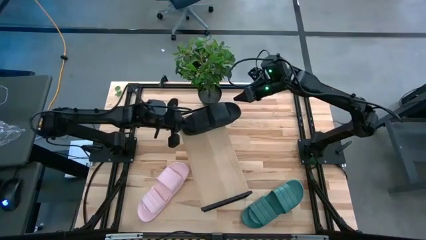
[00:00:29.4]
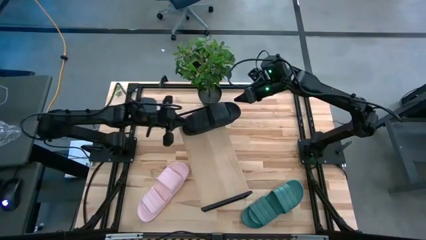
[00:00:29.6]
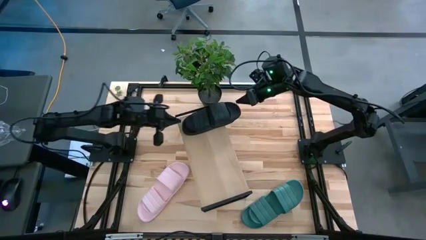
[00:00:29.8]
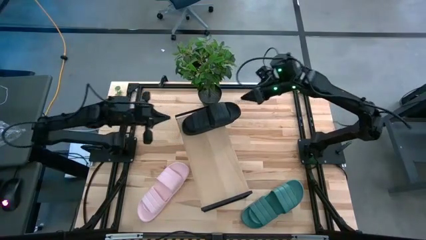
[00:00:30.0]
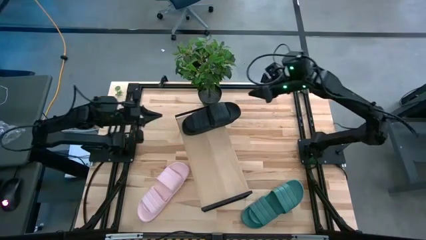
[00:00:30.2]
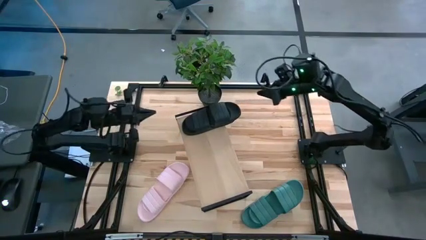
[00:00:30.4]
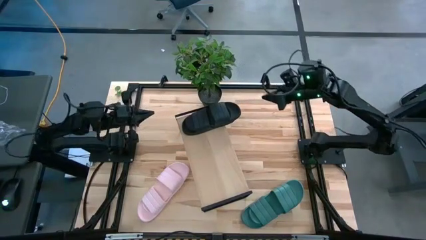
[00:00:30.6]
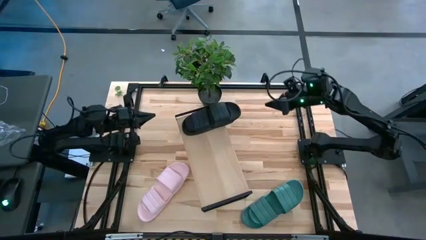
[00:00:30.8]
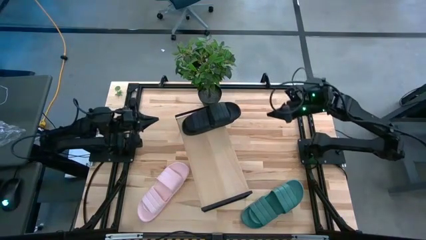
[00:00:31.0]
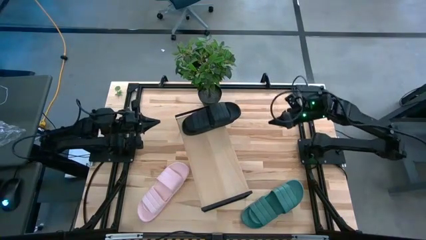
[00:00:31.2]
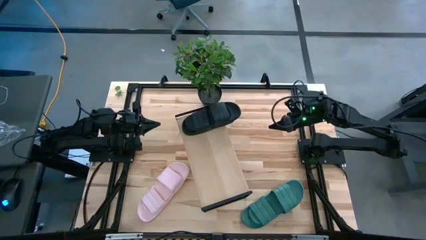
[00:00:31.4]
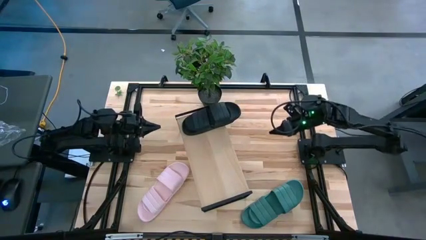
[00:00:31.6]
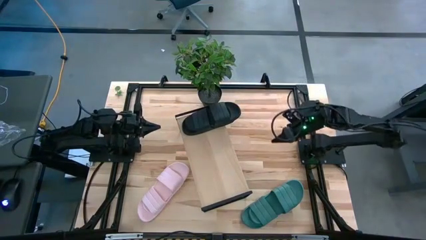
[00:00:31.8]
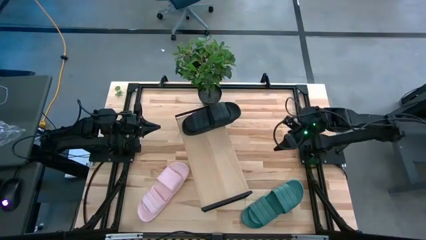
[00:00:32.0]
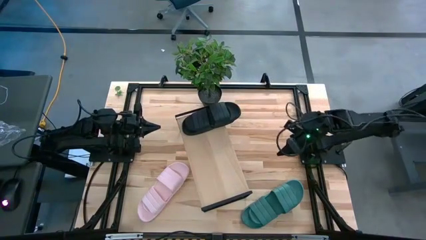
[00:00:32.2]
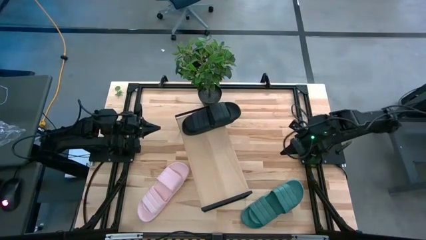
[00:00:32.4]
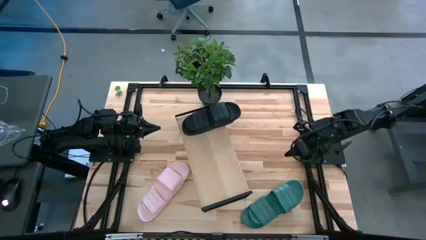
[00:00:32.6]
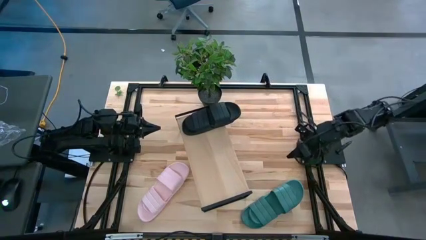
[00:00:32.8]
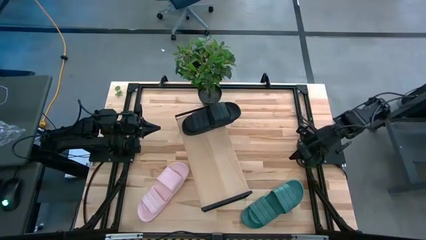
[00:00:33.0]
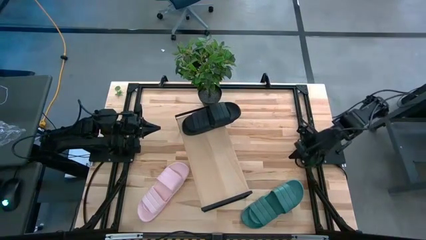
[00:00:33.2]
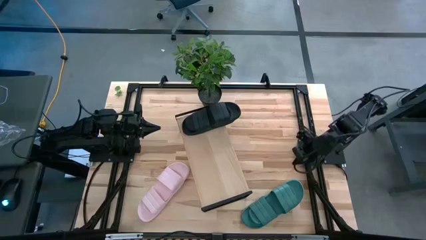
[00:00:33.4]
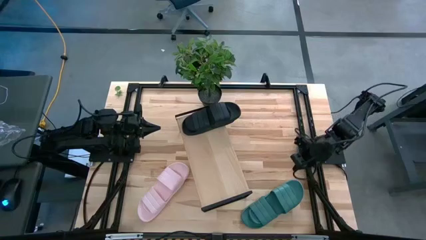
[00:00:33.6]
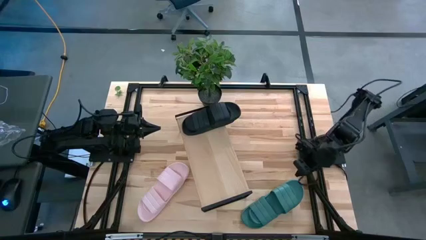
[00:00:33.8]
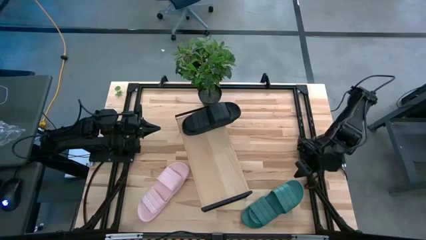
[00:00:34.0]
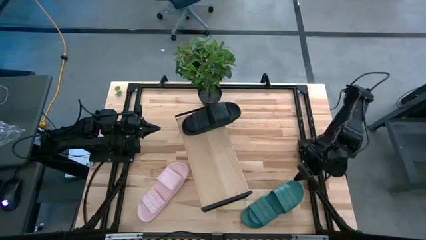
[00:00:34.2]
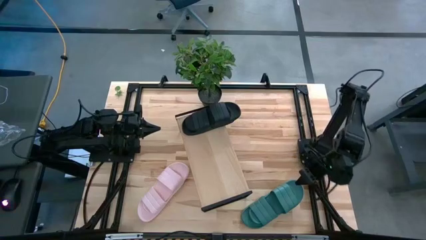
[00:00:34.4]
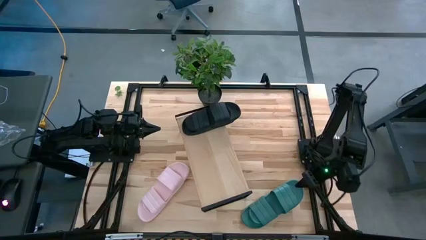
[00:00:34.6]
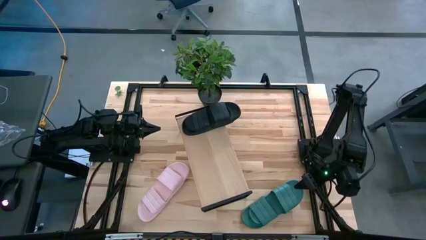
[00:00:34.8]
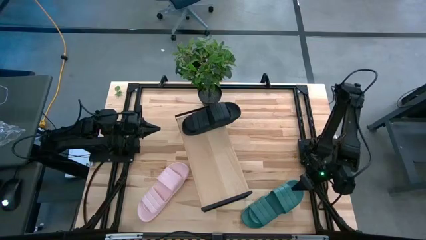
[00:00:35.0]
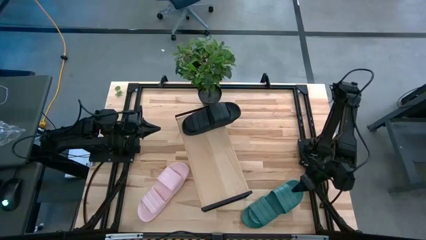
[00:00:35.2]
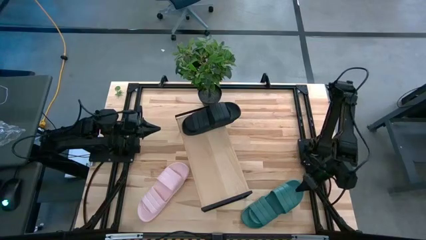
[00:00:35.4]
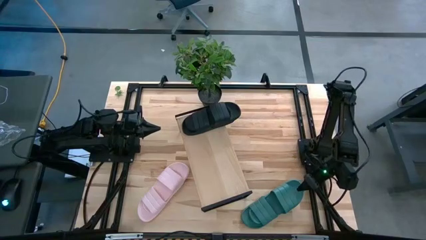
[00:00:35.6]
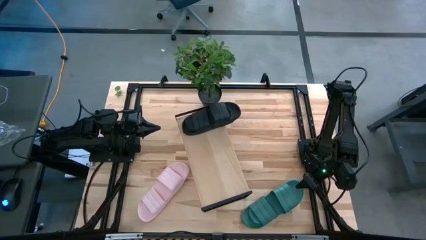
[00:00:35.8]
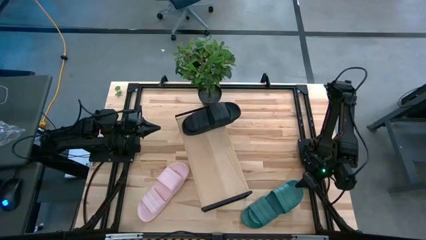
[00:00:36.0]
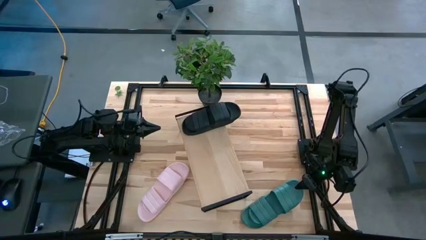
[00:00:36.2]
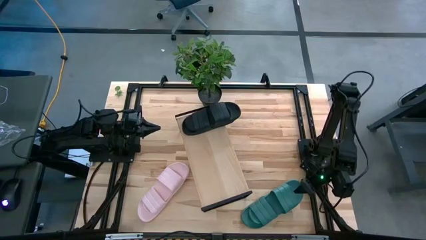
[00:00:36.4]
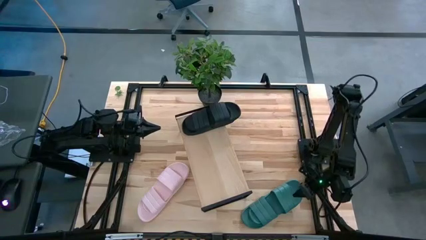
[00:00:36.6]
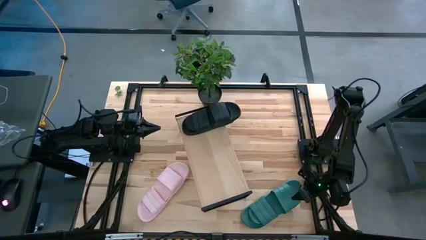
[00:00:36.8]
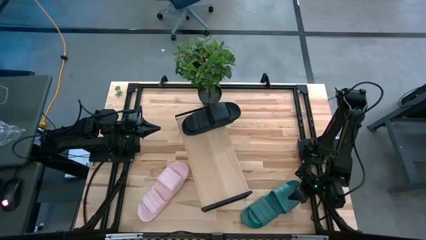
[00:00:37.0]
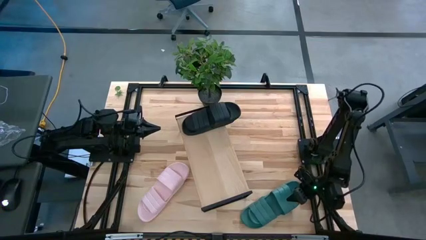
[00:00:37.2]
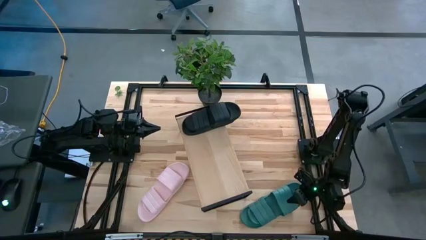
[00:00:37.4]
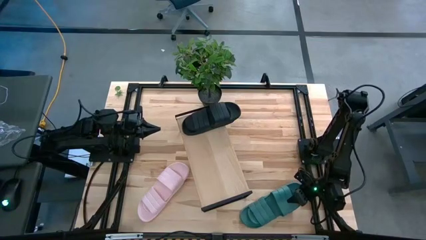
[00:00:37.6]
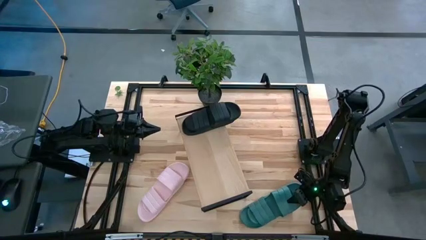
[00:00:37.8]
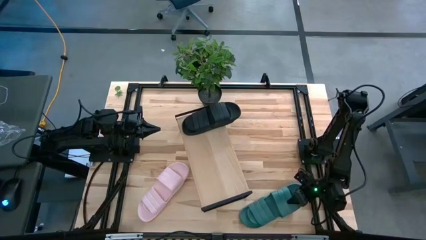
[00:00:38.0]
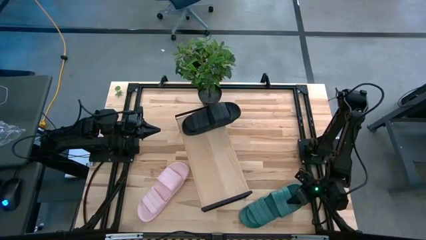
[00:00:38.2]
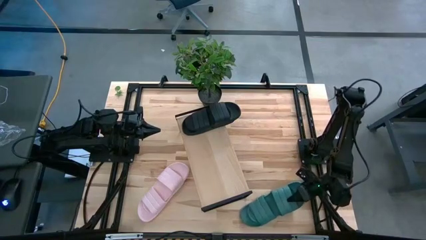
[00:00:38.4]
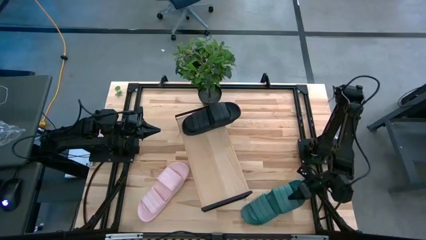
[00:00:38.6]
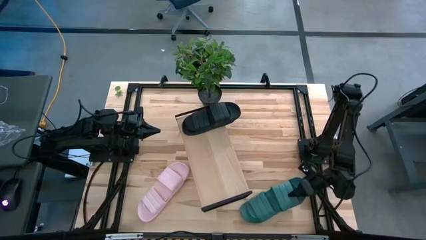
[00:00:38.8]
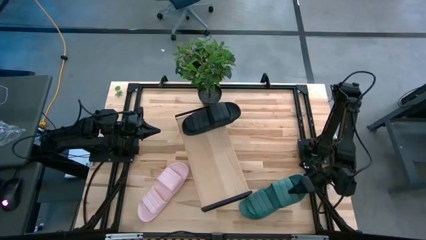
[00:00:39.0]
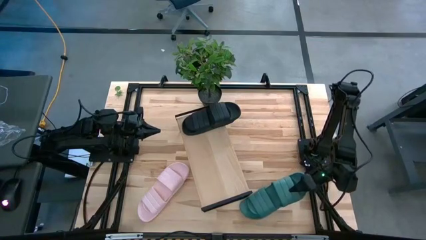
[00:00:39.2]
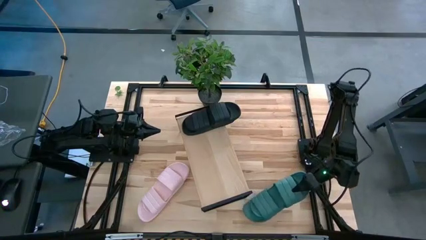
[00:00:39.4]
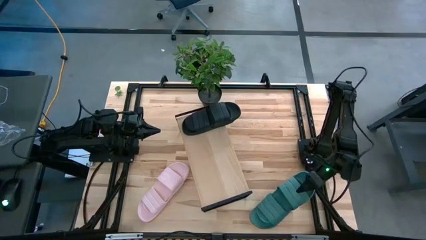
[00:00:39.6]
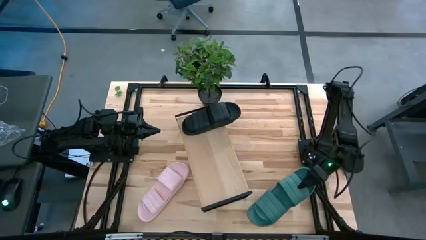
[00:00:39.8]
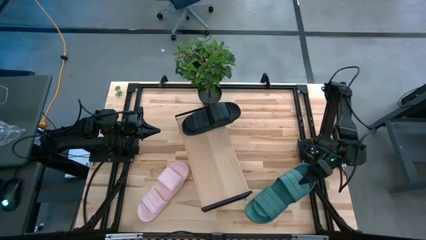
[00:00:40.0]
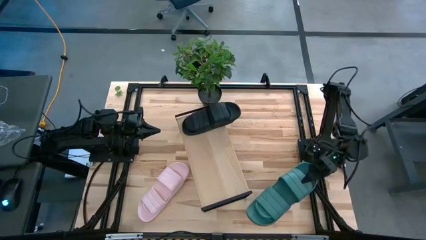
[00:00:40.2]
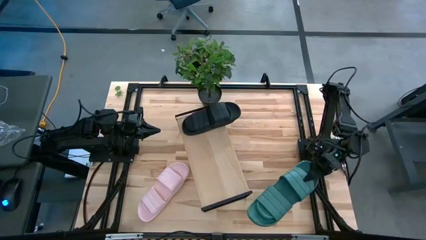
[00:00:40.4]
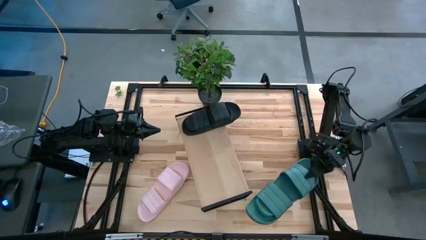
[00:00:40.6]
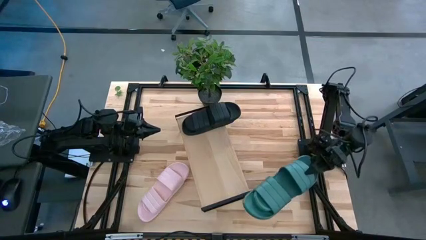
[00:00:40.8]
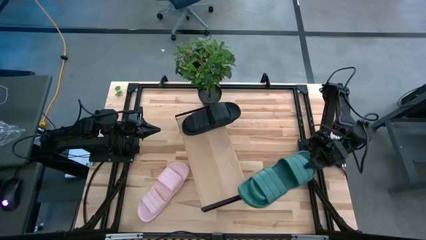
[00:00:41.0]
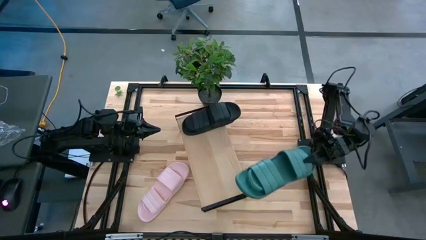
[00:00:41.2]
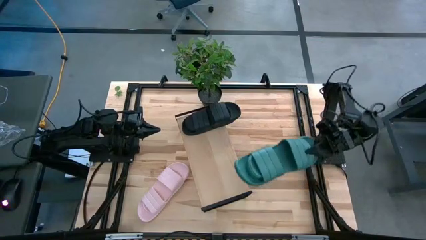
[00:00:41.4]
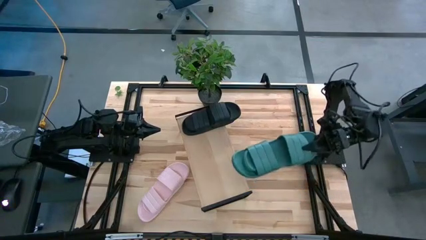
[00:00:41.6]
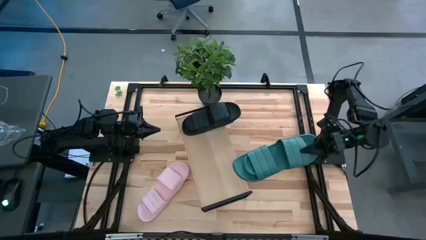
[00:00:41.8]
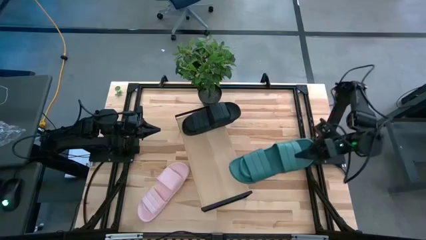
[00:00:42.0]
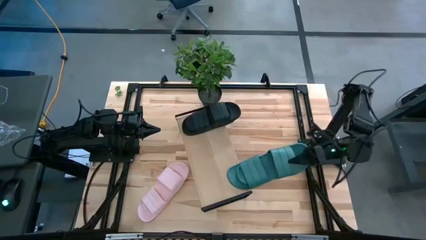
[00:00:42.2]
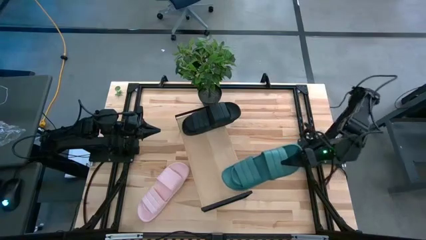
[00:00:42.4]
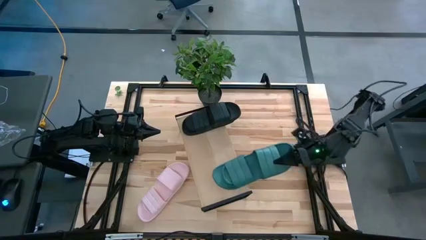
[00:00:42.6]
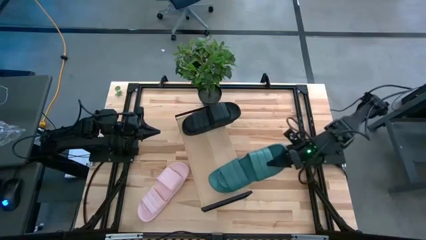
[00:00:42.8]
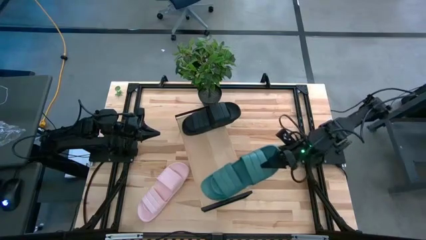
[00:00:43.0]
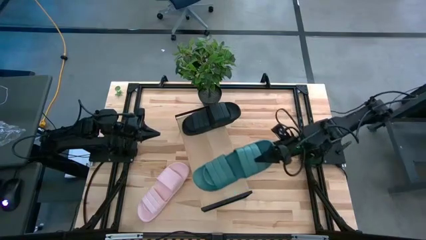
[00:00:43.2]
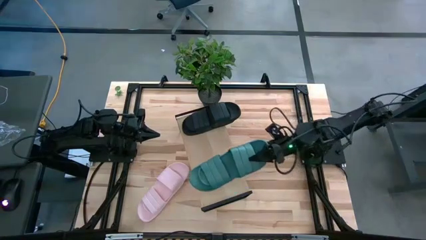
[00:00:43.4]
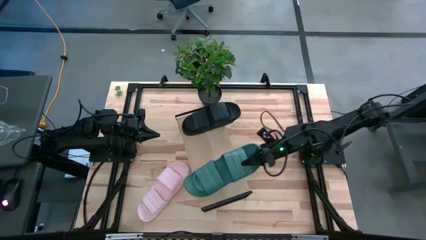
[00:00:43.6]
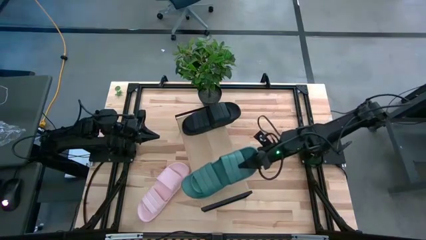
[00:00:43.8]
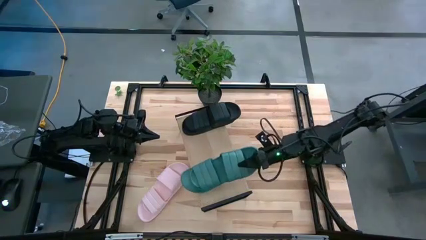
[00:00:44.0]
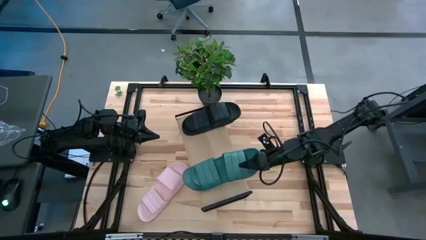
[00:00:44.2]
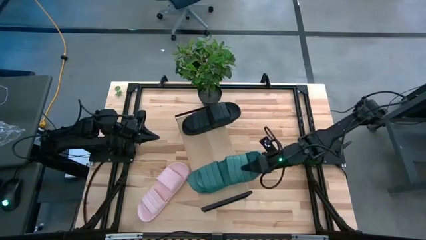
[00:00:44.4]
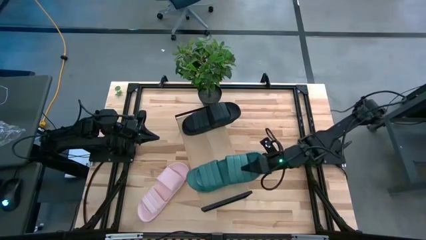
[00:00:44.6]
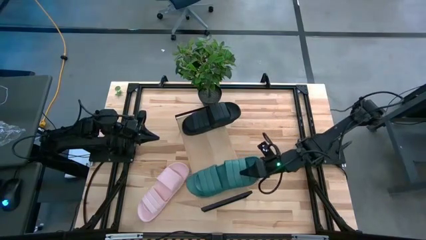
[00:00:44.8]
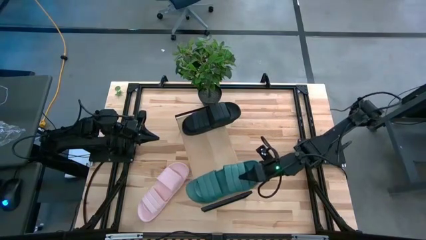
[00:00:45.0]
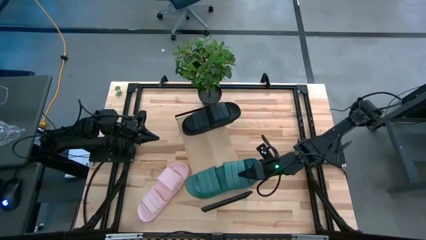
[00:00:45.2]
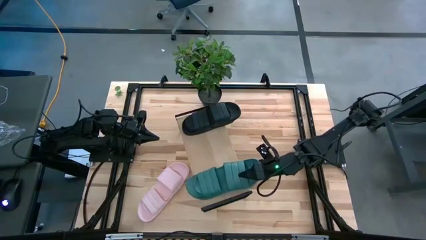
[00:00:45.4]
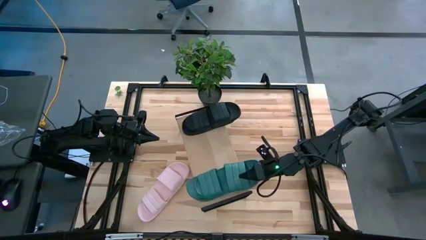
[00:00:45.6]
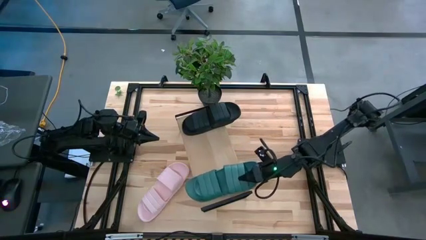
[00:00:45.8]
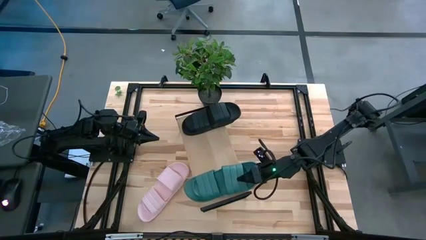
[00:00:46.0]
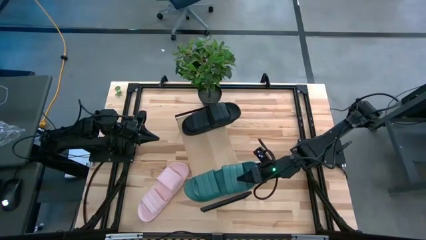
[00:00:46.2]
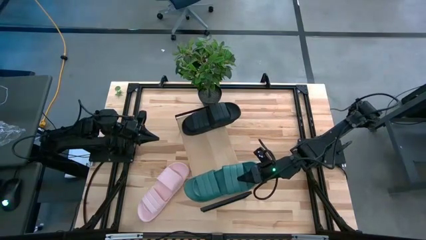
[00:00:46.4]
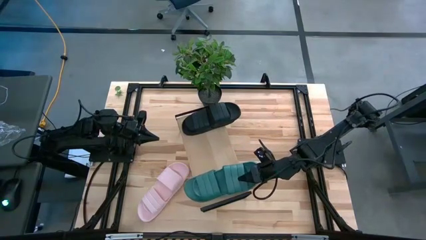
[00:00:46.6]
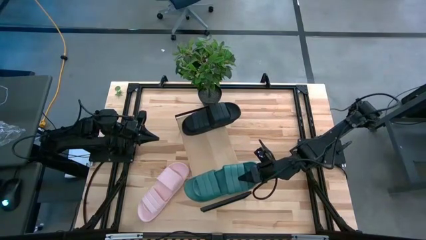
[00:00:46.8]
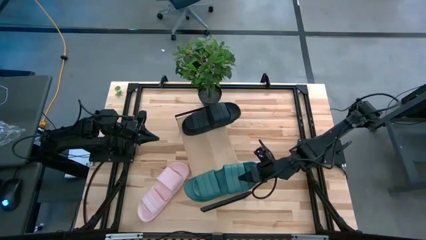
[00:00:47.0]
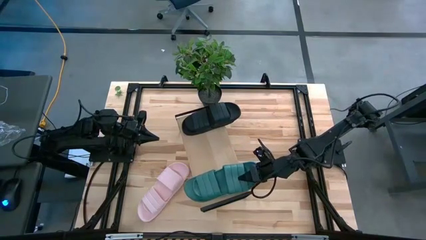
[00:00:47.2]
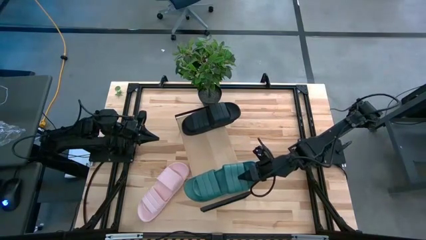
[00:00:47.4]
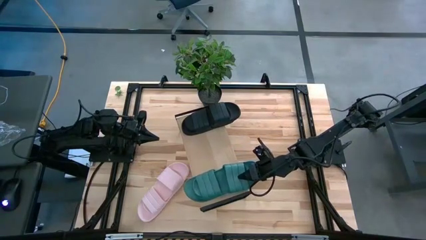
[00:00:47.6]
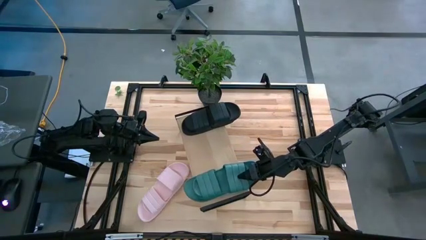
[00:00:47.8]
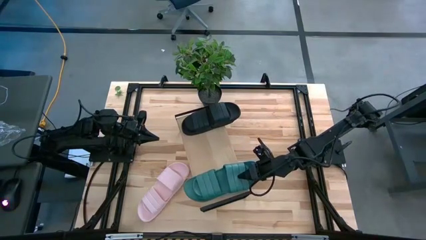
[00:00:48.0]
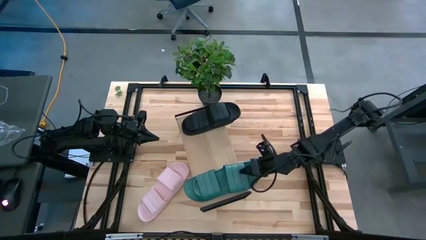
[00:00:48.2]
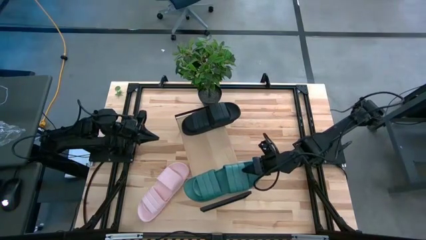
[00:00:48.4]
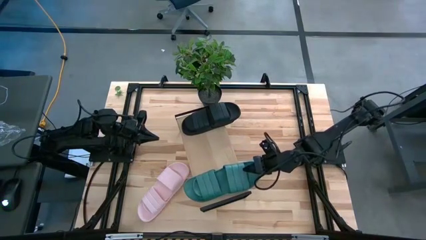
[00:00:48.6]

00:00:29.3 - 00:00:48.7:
Task: Pick and place slides into the shelf
Put the green slides on the shelf
